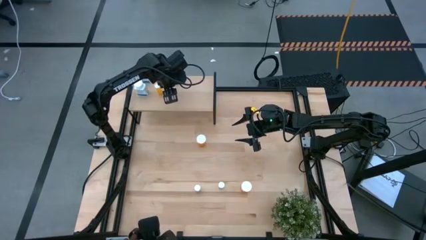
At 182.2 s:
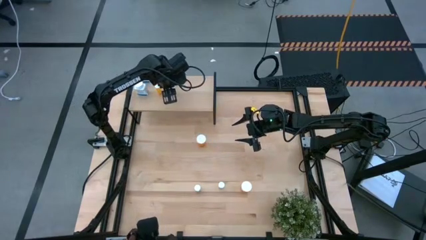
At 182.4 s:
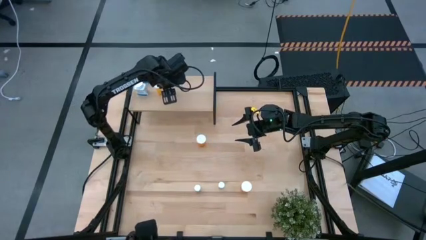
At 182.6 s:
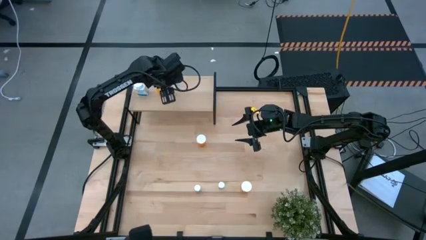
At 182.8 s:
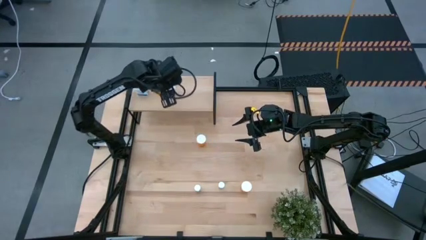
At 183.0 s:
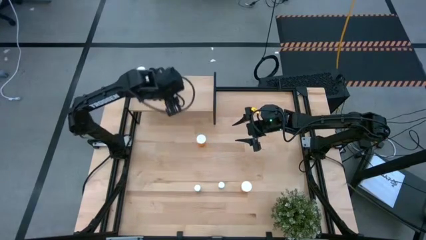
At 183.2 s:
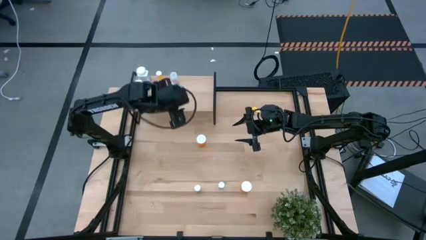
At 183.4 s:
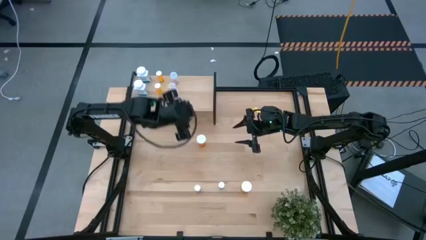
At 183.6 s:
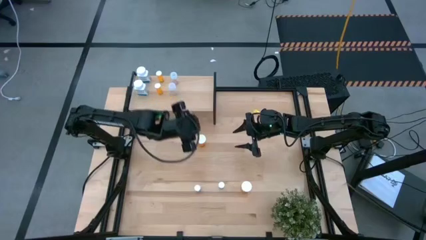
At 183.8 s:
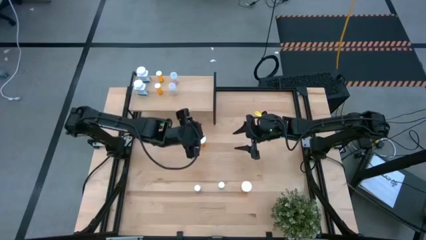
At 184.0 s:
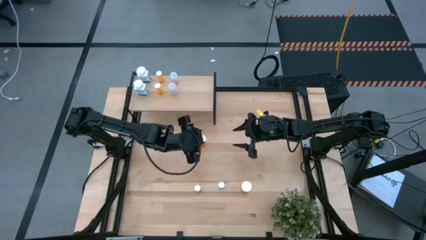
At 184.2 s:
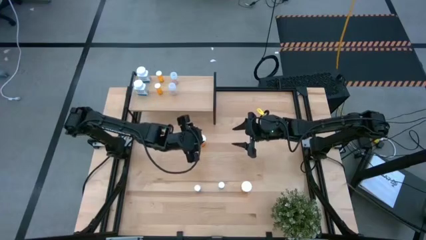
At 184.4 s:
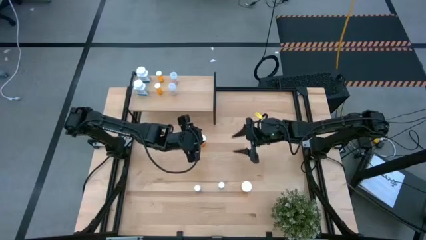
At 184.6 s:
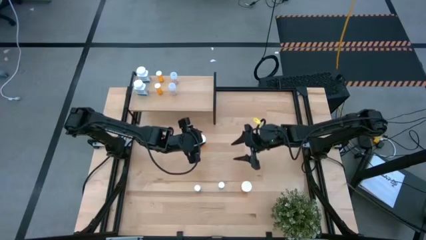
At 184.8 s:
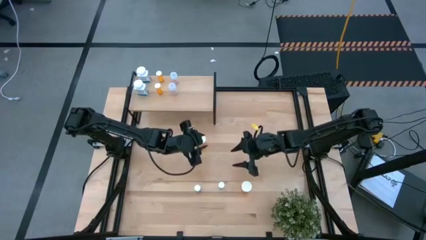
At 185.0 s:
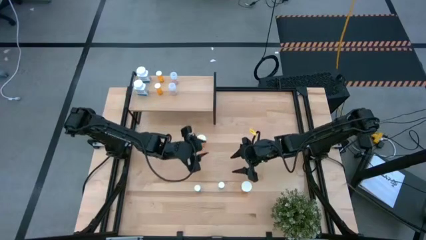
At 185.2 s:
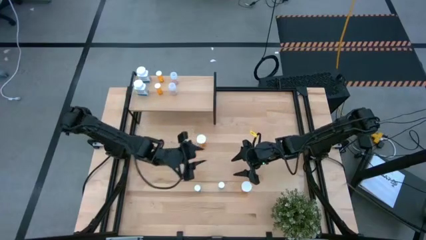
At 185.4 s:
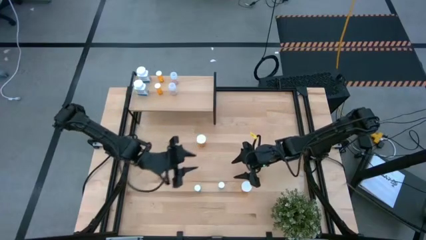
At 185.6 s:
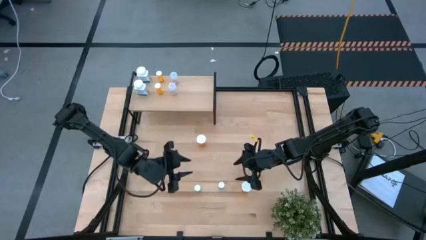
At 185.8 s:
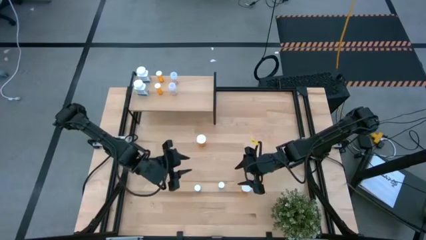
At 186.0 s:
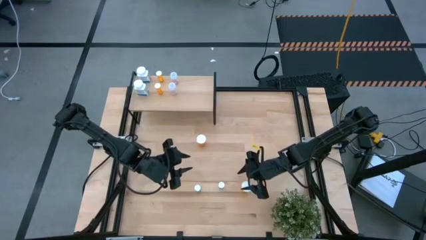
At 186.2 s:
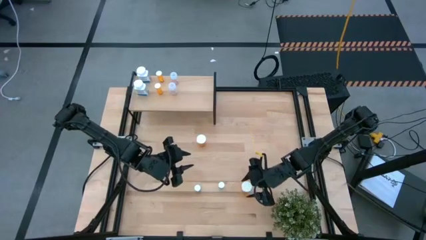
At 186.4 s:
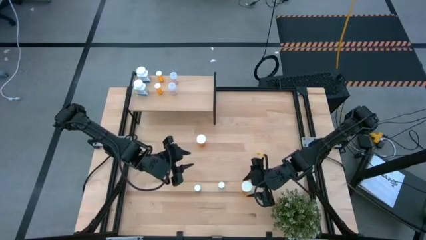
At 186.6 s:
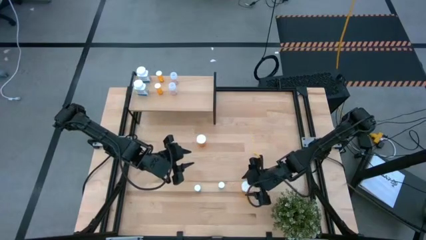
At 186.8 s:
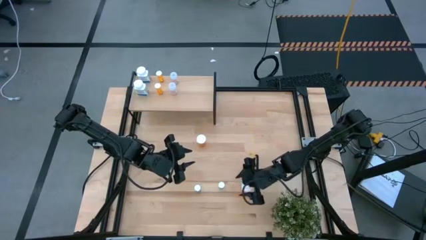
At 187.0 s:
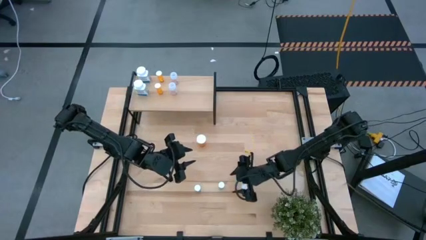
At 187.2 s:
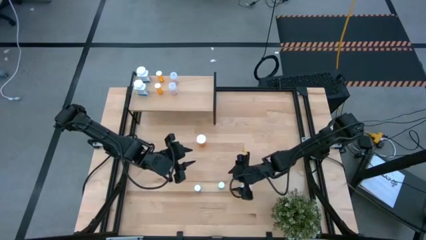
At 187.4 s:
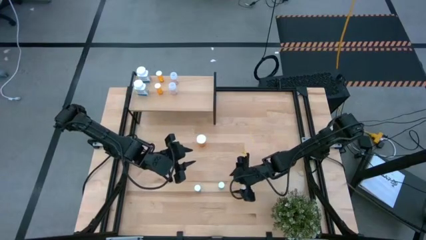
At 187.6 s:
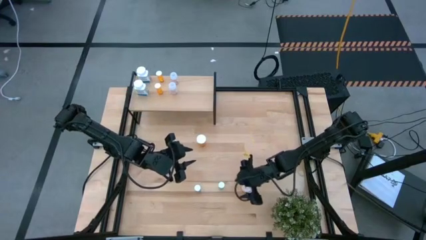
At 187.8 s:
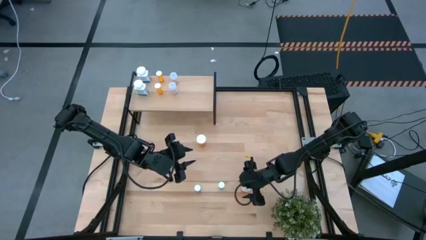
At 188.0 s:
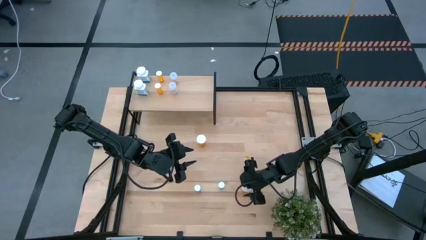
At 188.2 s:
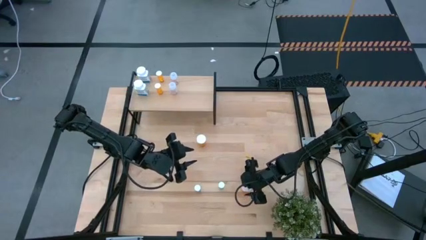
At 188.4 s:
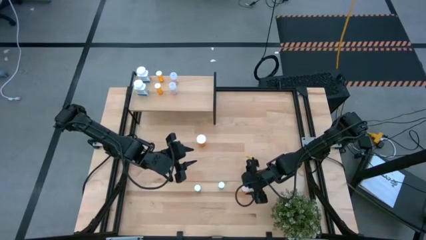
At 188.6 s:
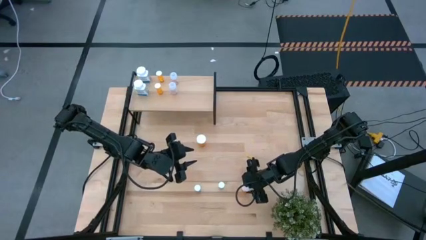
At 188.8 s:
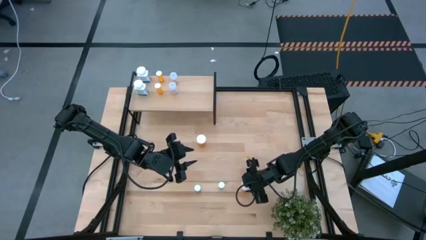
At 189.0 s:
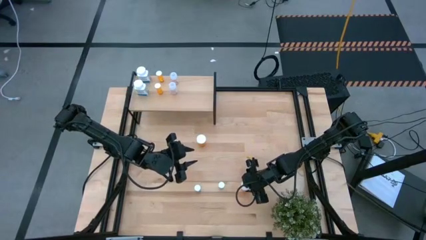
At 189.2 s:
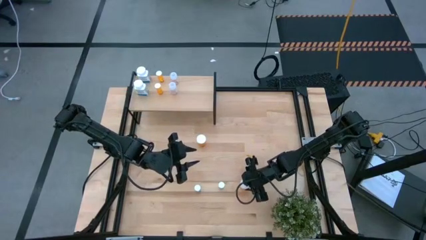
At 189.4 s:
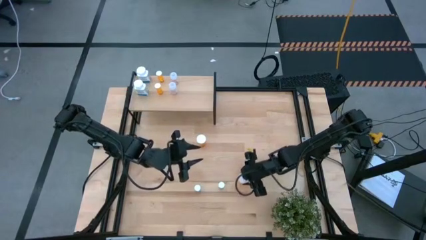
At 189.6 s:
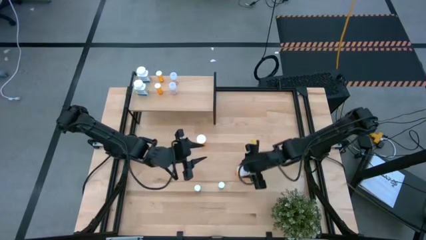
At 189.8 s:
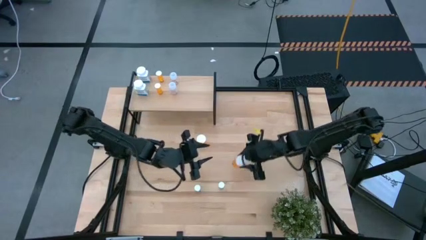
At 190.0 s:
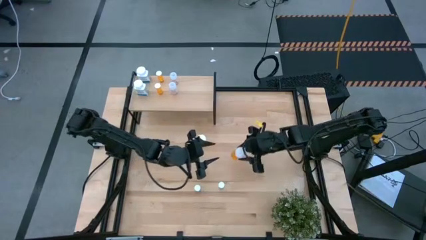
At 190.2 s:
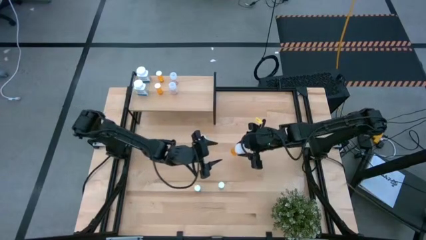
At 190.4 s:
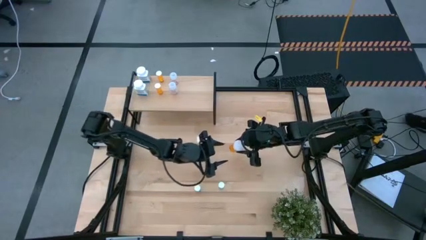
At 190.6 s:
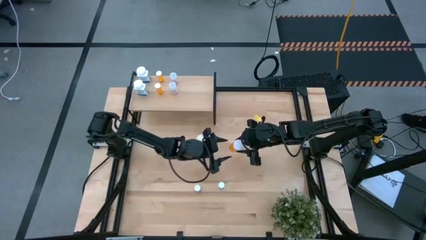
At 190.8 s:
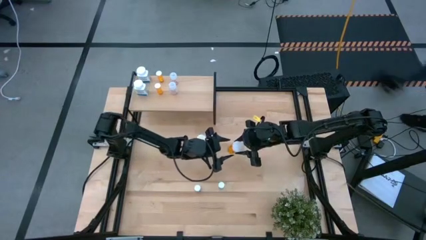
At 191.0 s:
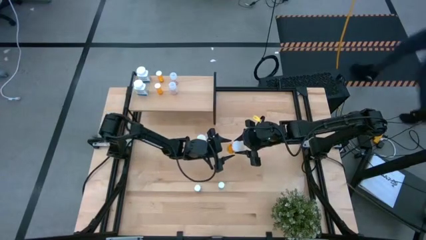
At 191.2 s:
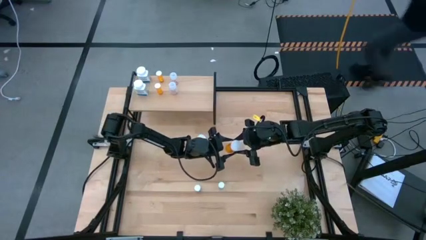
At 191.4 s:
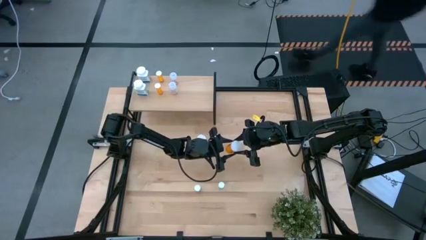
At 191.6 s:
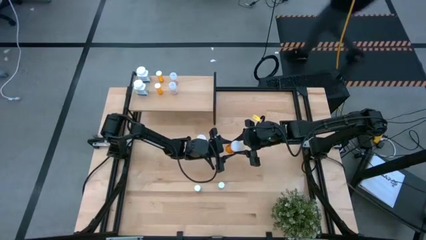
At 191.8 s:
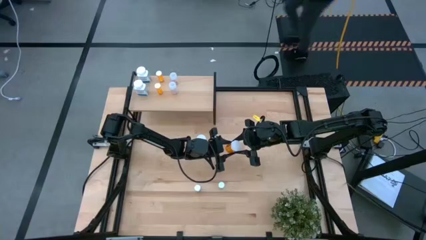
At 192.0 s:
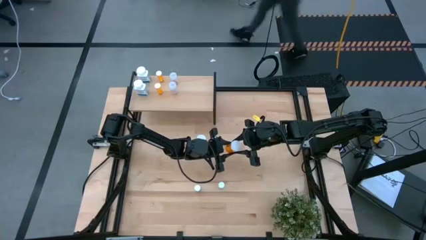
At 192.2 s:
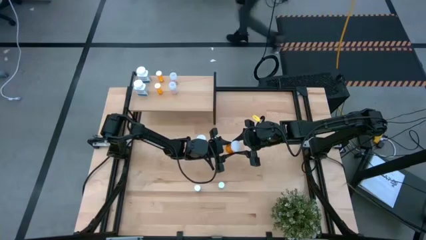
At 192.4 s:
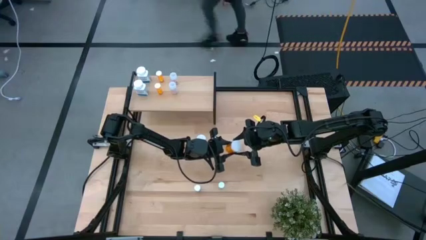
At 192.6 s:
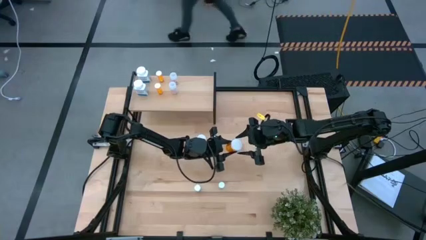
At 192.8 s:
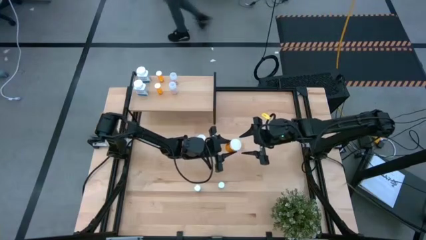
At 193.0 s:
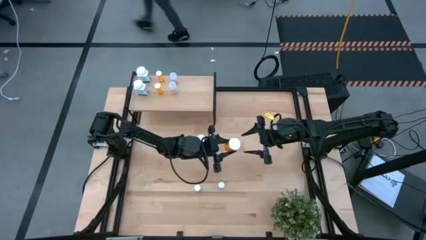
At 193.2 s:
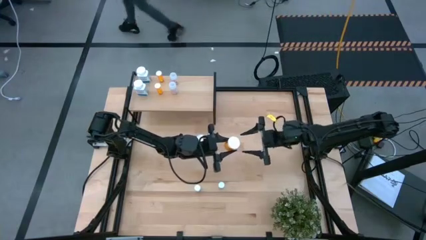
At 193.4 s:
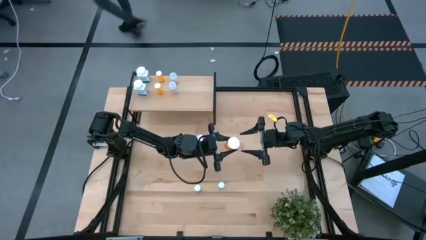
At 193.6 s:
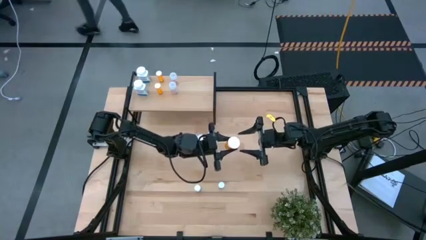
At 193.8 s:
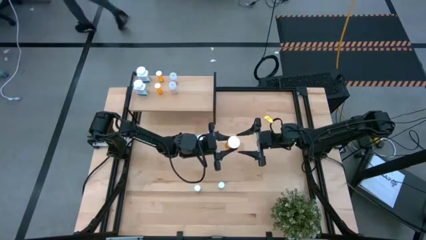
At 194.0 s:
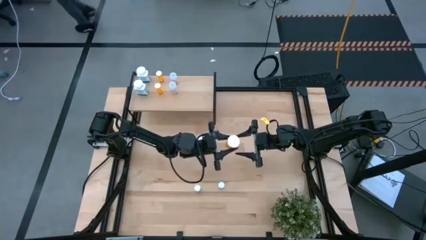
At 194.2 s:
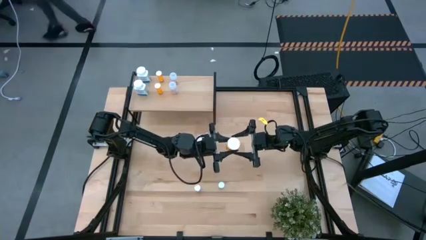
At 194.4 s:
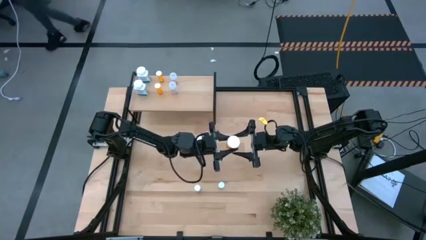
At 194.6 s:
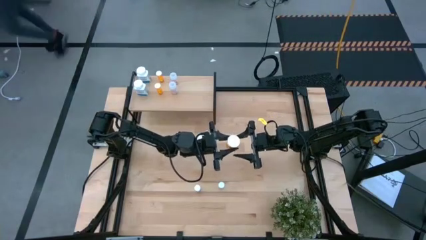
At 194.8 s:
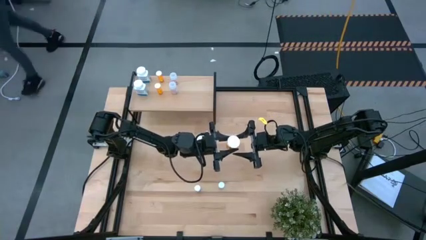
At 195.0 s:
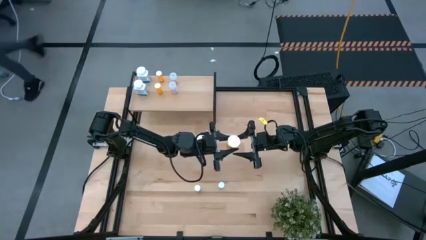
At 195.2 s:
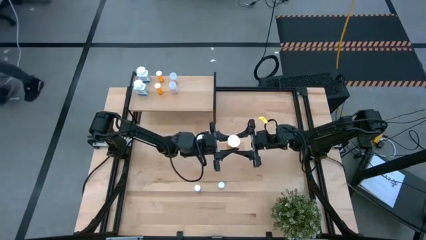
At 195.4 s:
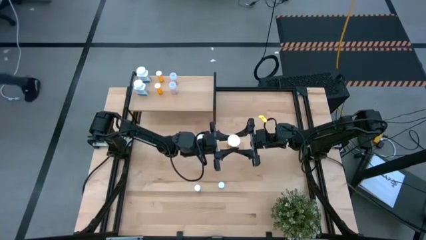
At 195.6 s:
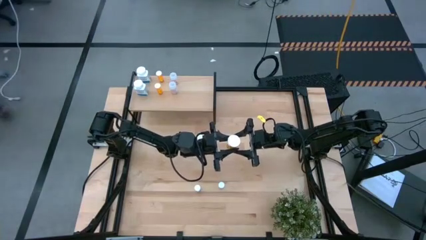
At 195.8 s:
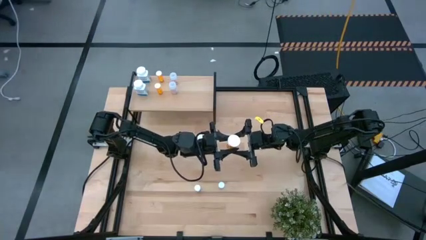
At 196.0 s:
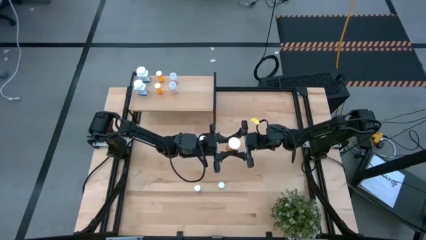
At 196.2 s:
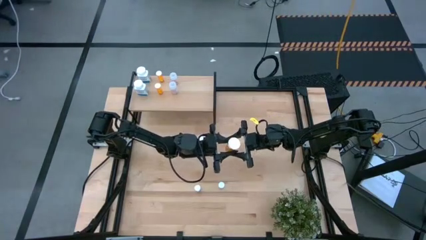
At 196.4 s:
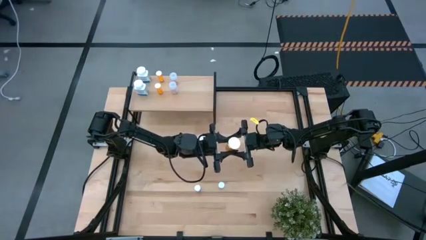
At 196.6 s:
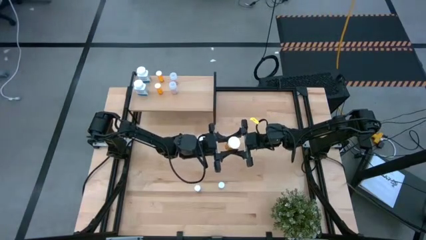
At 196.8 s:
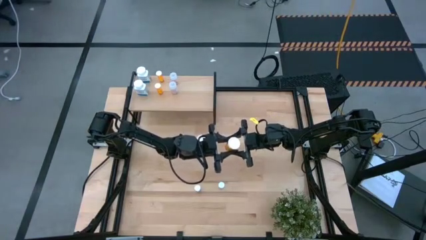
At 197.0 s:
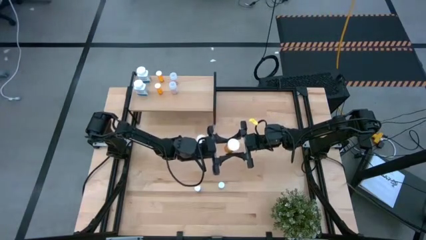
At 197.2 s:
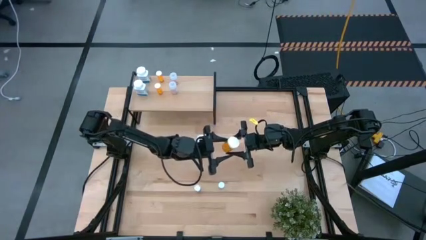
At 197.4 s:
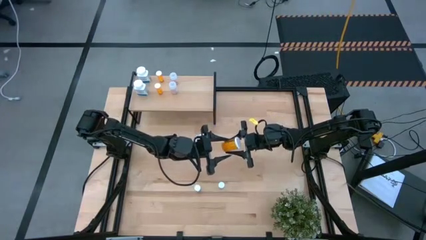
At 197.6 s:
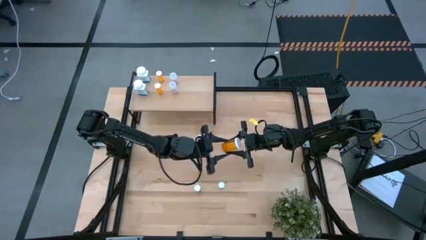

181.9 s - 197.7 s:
Task: Pick and place medicine bottles onto shelf by color
Put the bottom large orange pill bottle on the shelf
